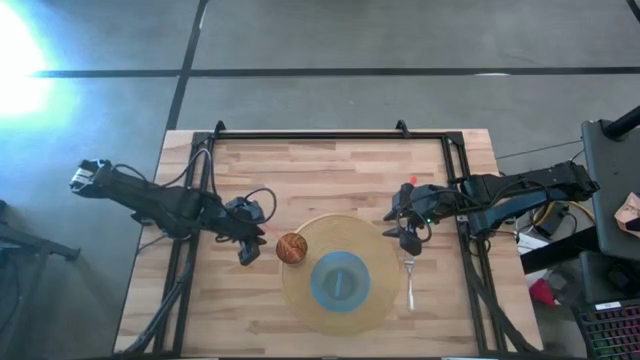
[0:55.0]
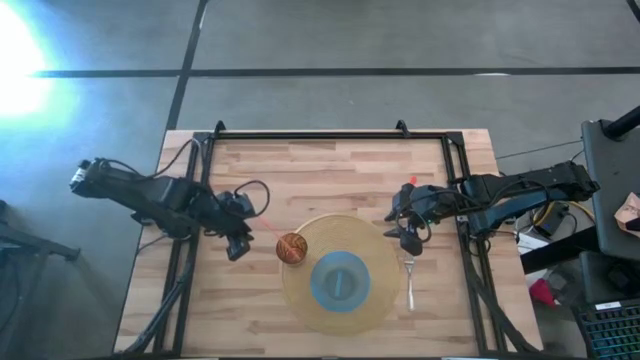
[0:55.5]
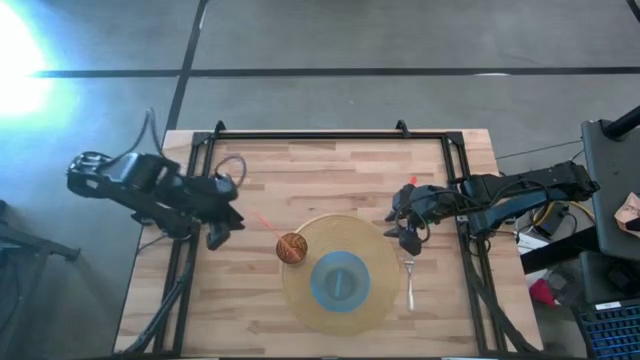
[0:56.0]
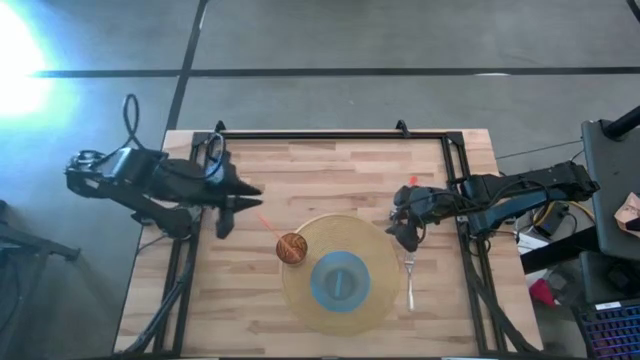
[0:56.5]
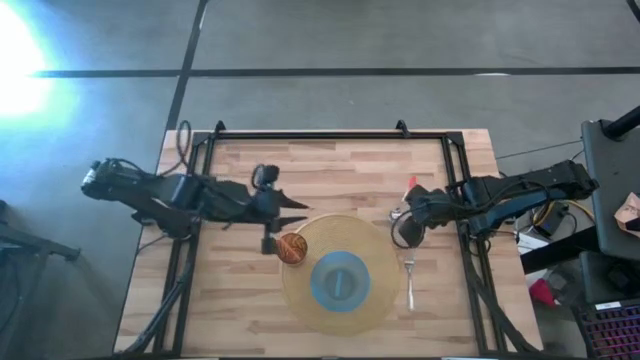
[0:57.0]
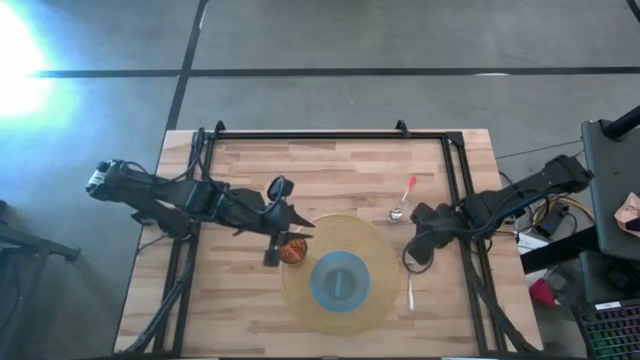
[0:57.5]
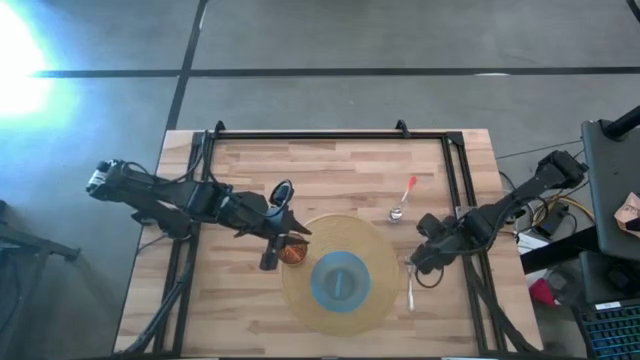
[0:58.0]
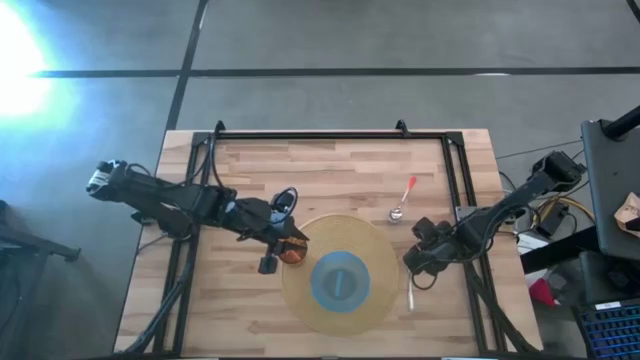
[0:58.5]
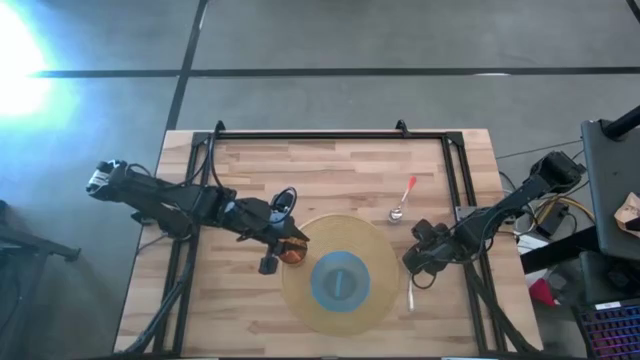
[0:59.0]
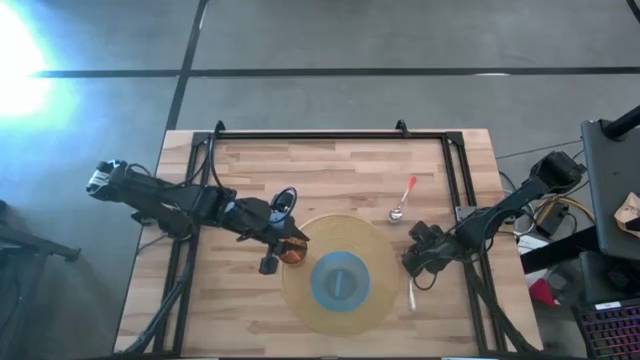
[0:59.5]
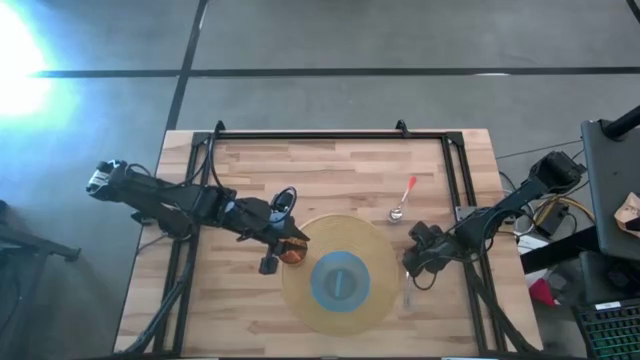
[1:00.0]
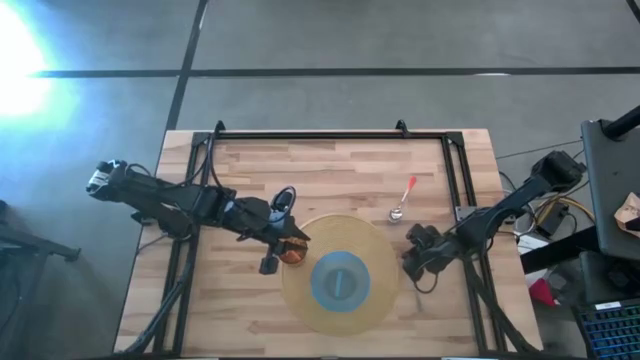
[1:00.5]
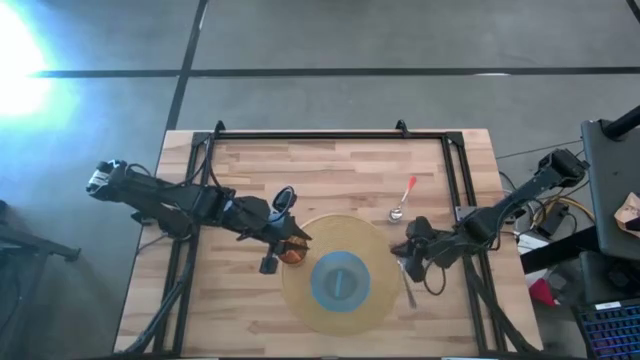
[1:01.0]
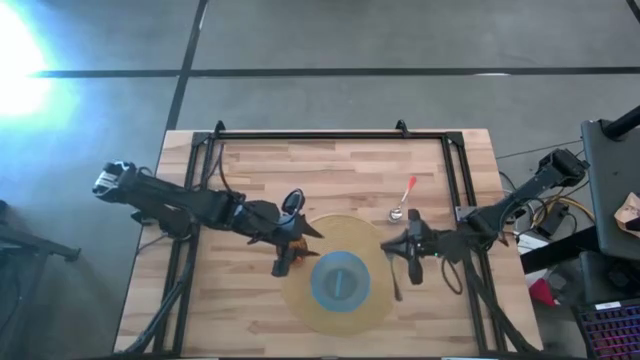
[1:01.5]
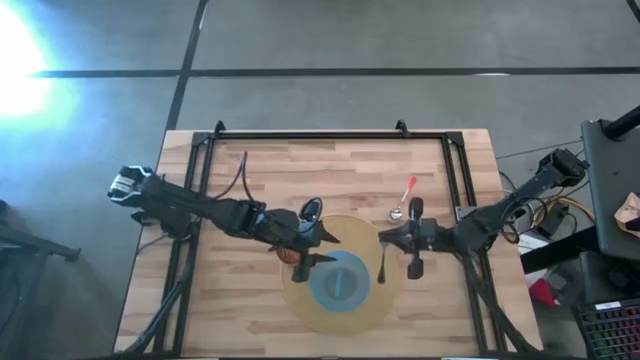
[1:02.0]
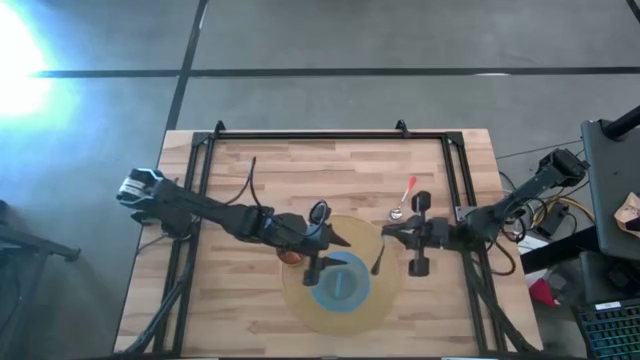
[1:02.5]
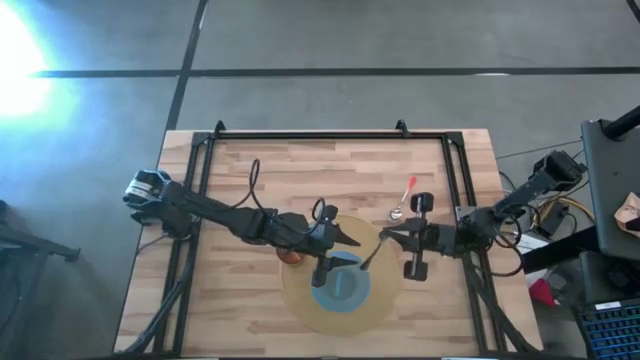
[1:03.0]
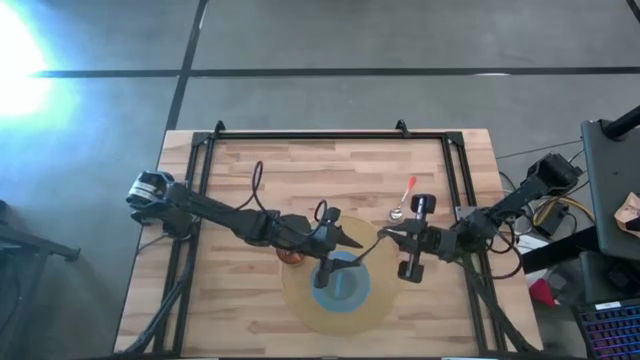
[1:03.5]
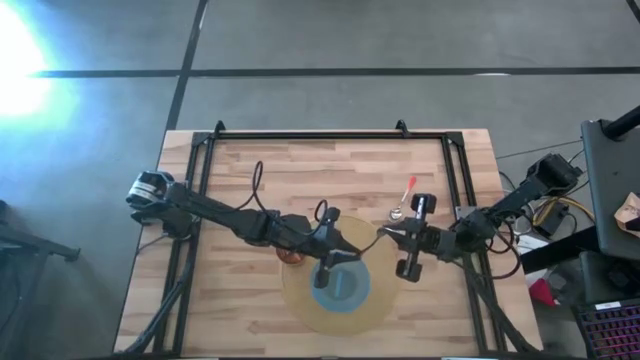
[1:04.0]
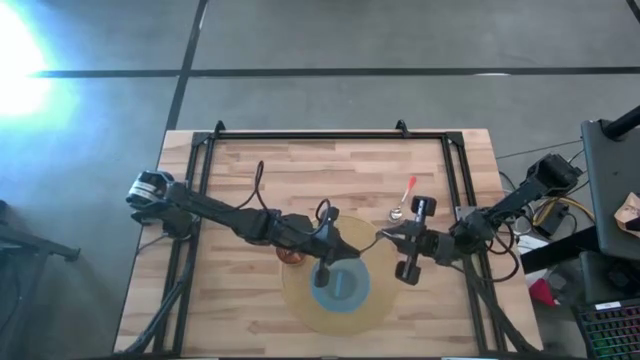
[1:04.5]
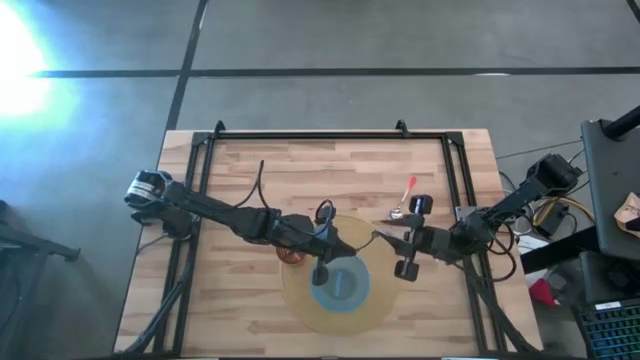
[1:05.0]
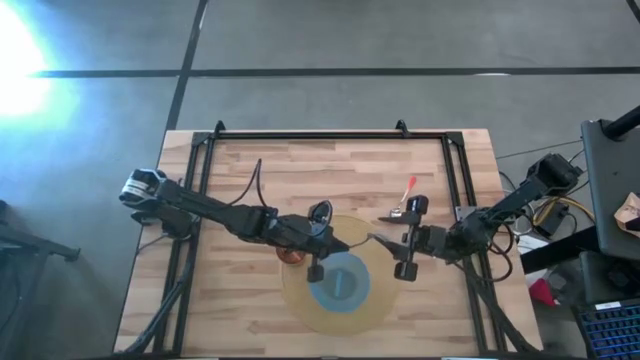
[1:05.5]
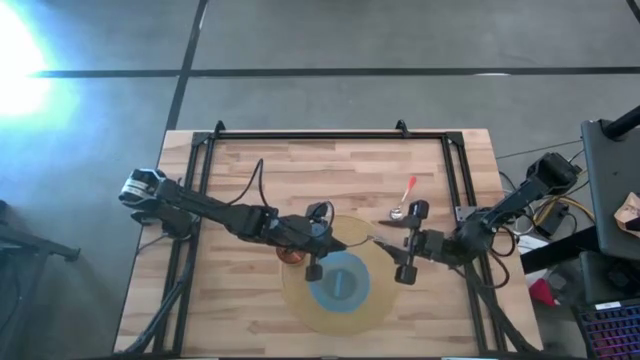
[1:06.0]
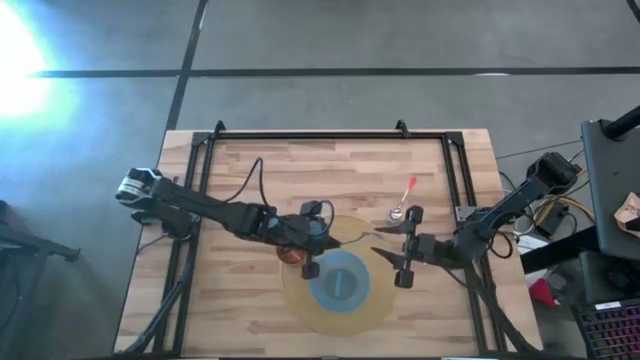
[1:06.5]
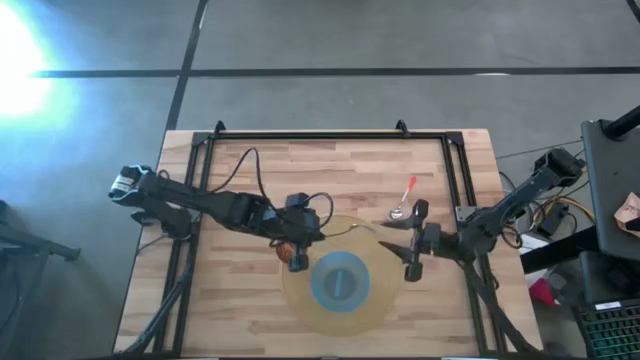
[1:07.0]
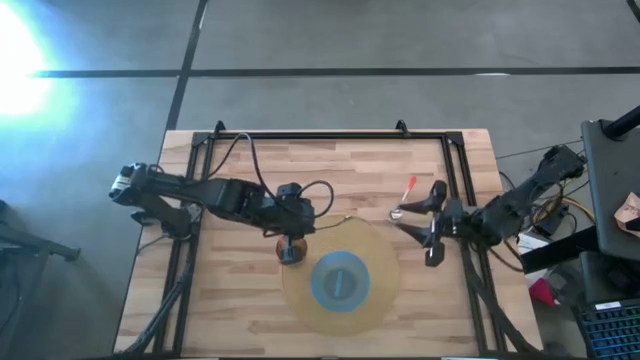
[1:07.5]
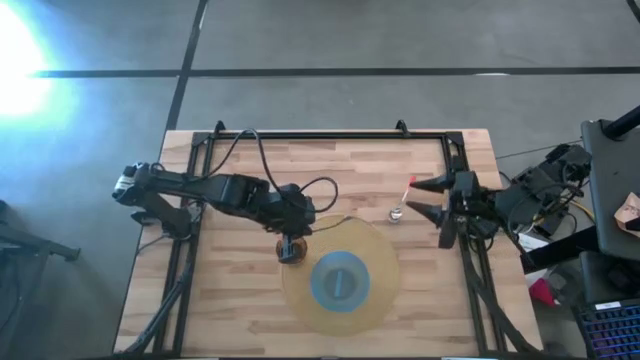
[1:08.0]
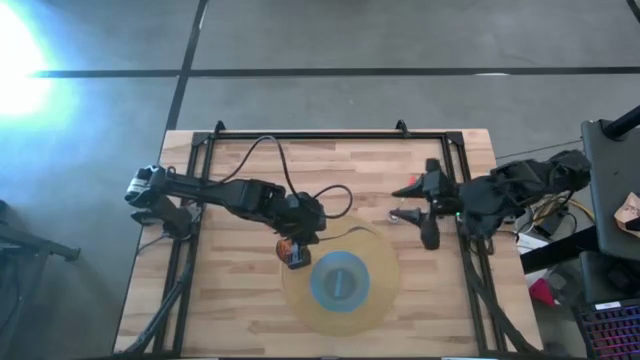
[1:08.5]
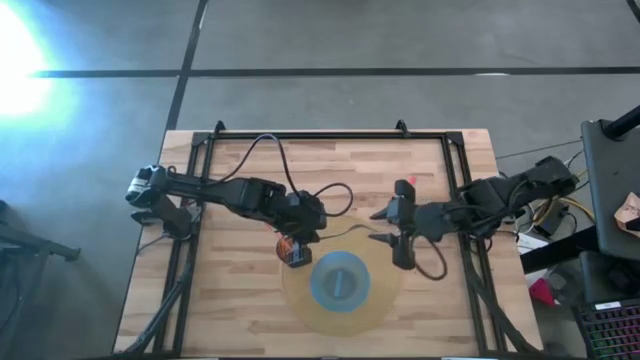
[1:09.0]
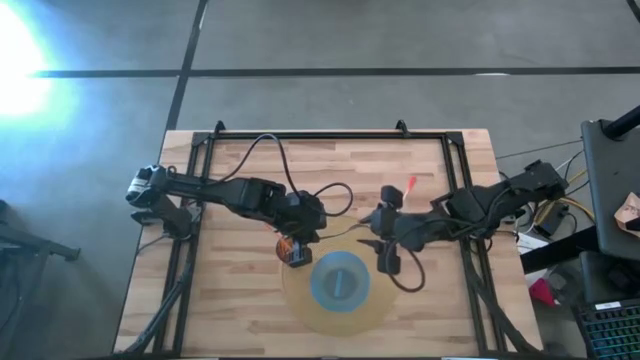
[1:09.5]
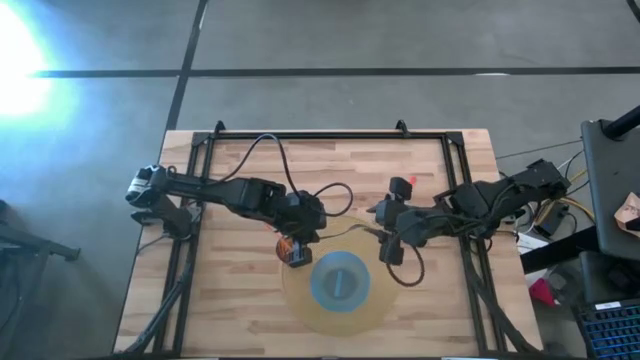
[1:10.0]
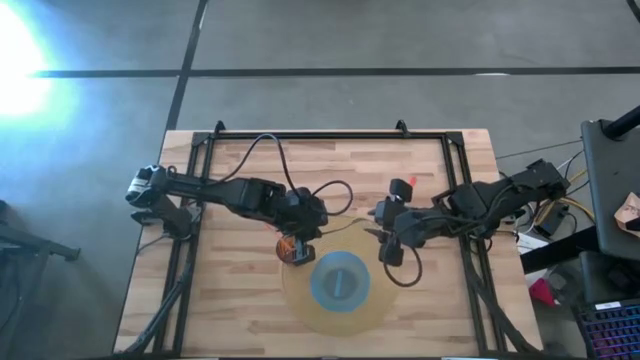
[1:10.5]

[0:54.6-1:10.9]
Task: Pick & Place Utensil
Put the fork into the bowl

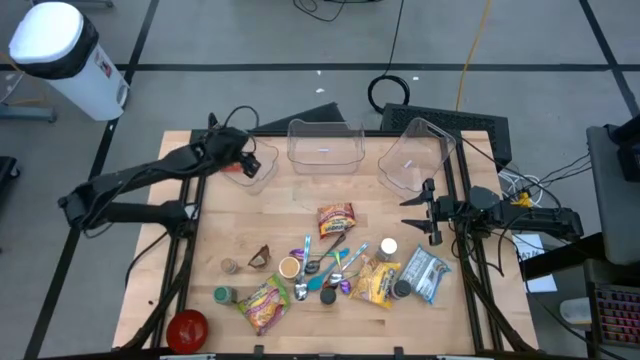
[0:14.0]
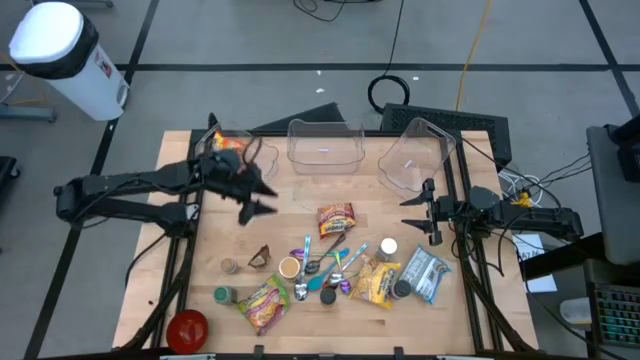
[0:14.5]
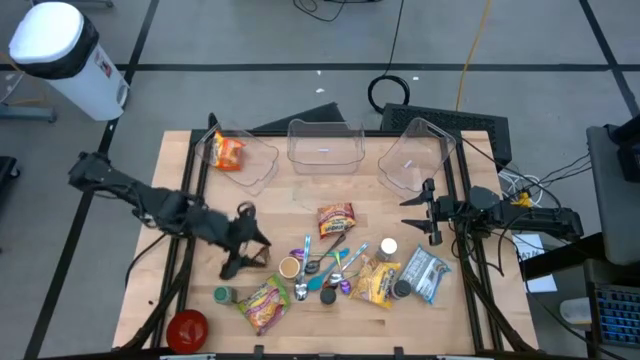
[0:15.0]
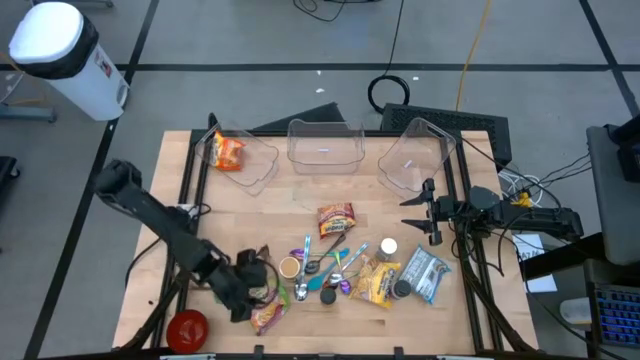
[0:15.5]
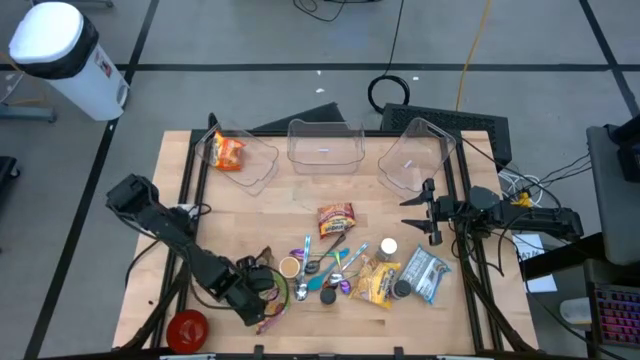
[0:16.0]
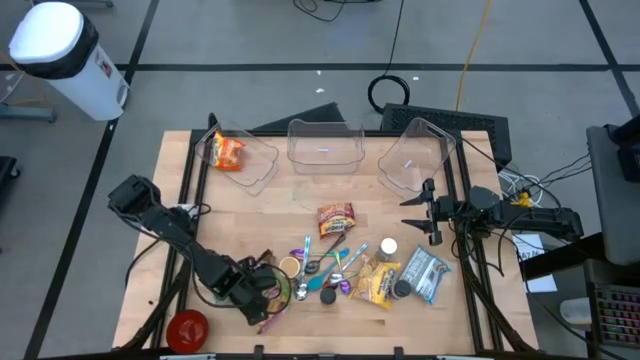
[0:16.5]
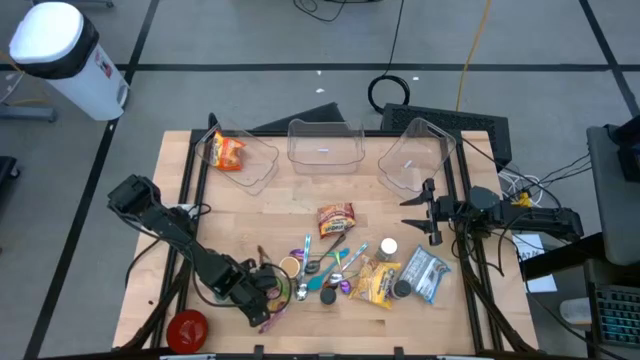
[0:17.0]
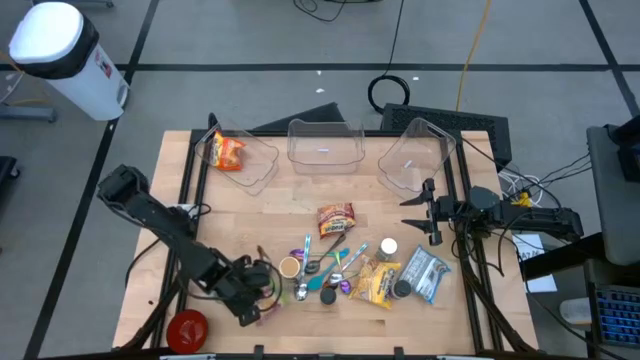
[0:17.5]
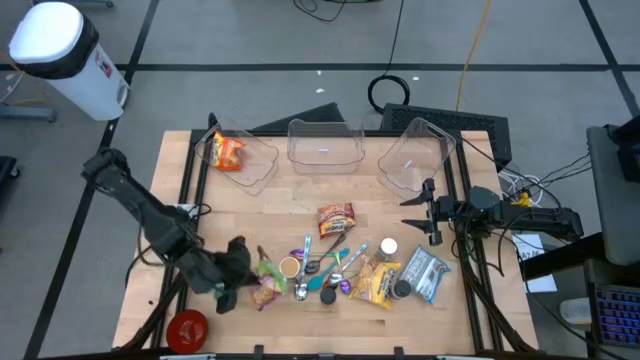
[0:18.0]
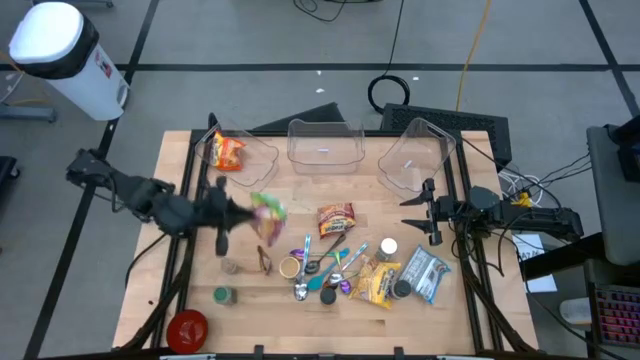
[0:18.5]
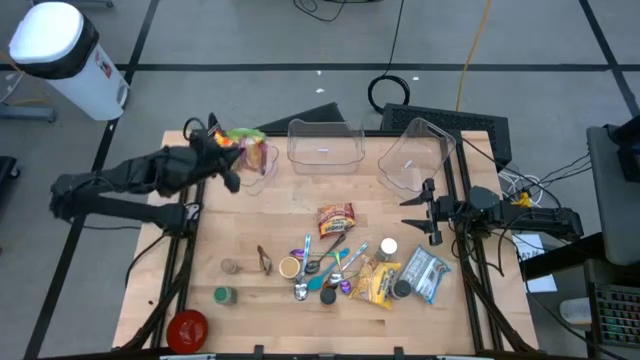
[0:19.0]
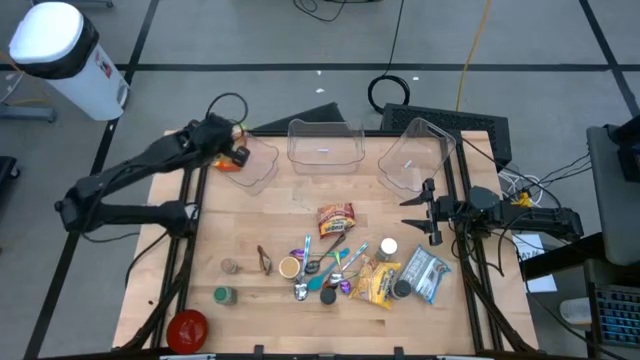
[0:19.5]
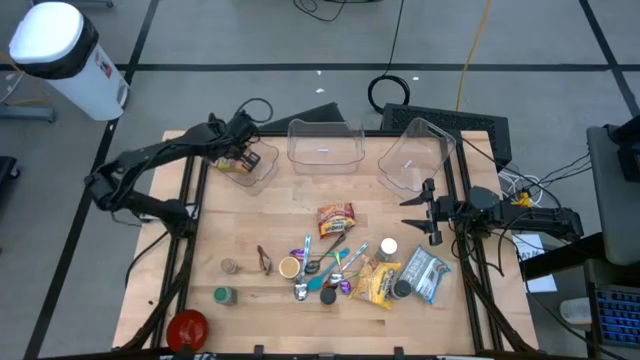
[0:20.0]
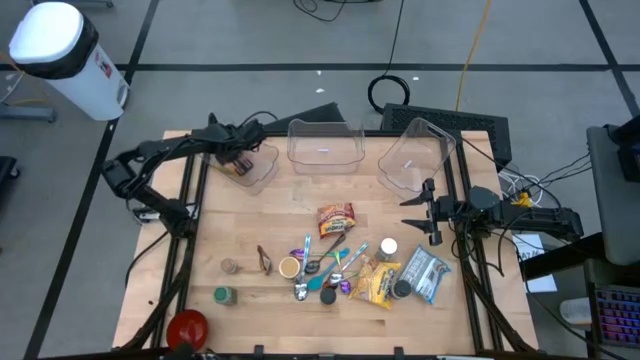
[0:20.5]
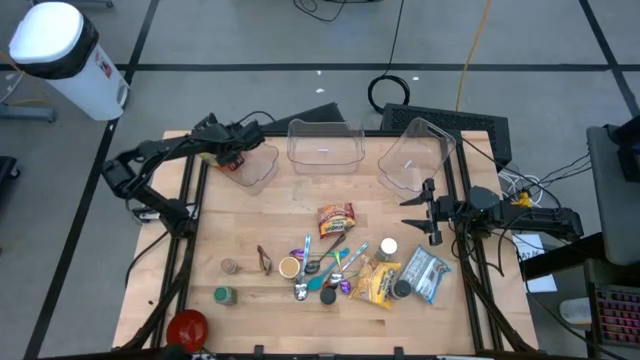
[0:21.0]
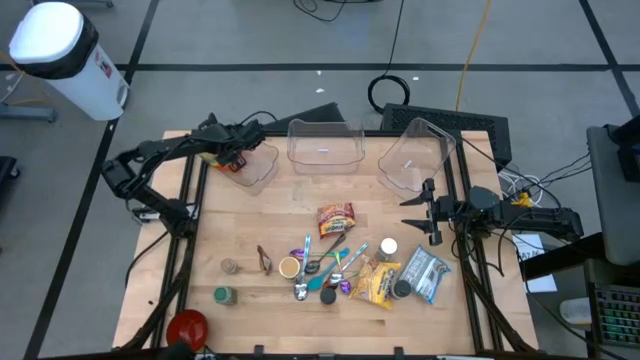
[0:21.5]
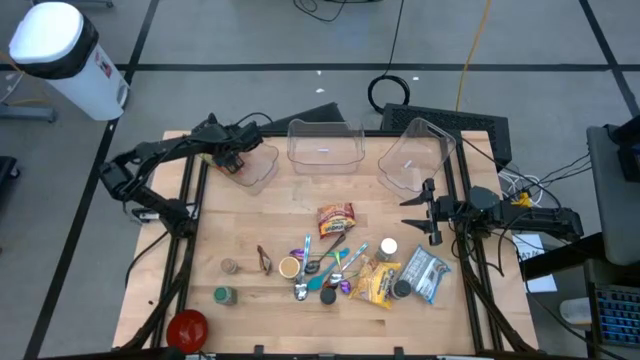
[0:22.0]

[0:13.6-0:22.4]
Task: Pick & Place Food Item
Put the green noodle pack into the left transparent bin
